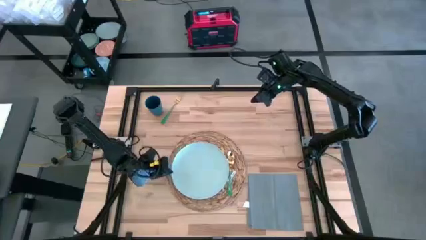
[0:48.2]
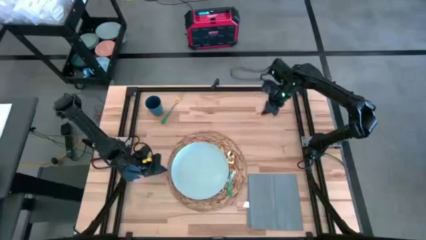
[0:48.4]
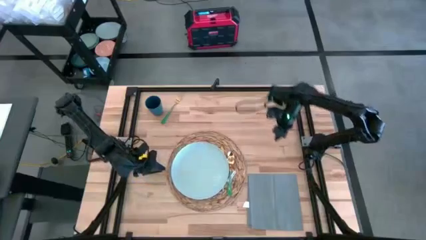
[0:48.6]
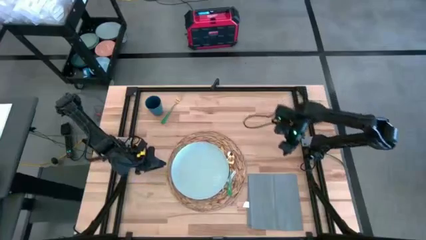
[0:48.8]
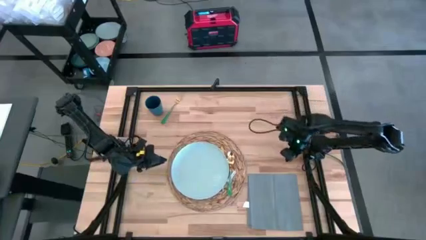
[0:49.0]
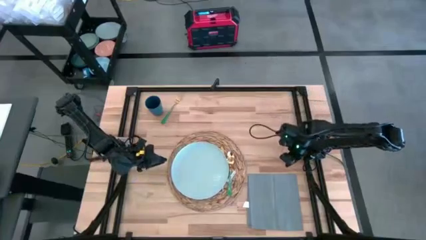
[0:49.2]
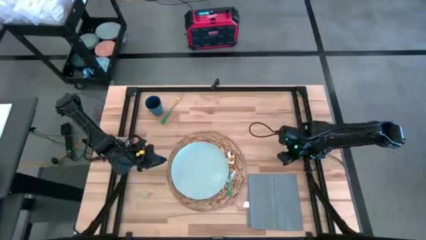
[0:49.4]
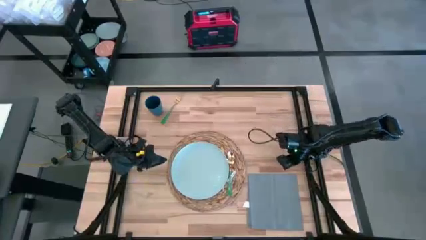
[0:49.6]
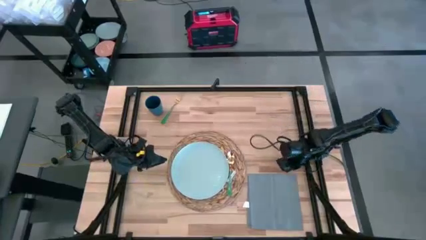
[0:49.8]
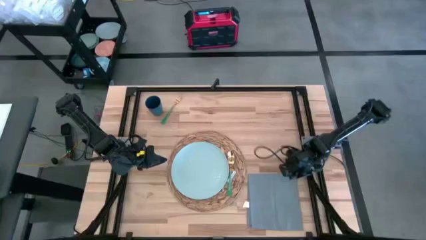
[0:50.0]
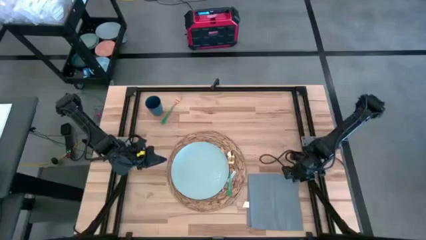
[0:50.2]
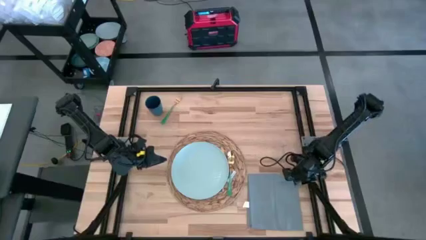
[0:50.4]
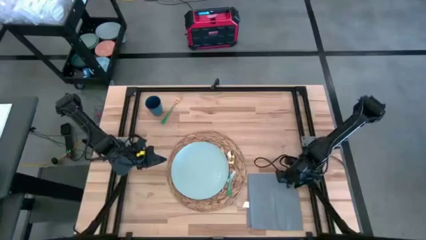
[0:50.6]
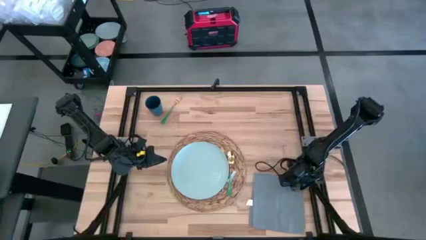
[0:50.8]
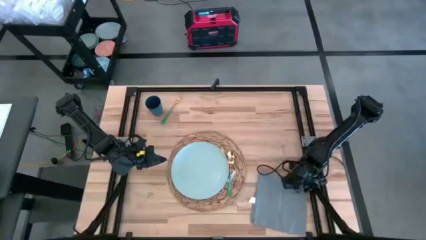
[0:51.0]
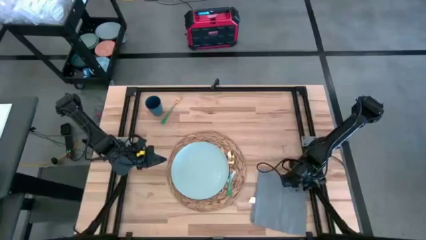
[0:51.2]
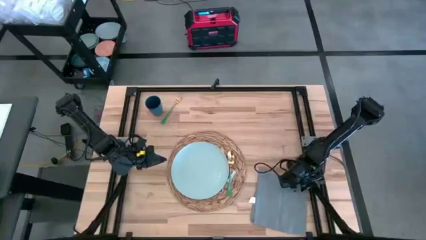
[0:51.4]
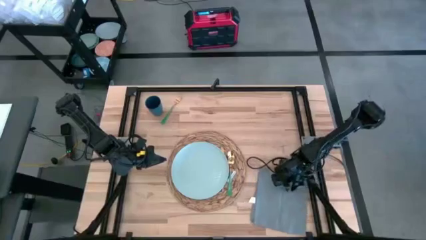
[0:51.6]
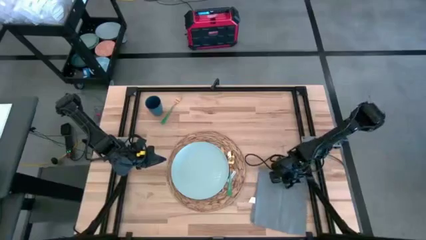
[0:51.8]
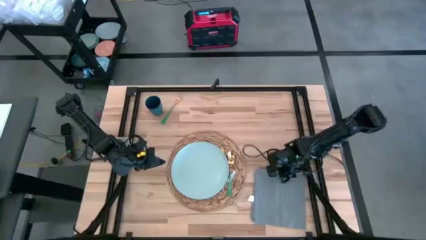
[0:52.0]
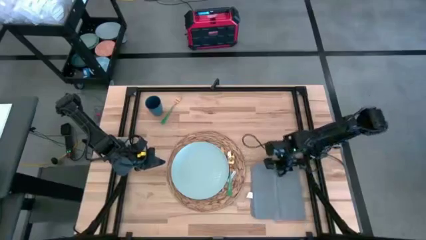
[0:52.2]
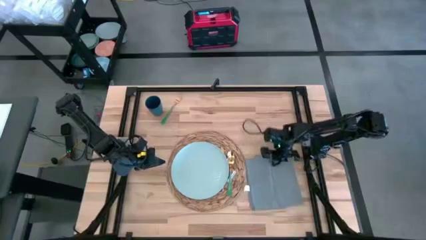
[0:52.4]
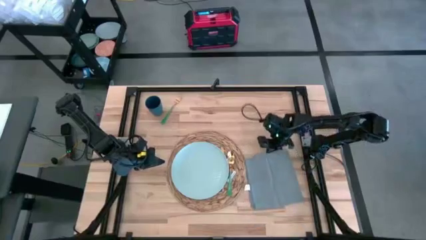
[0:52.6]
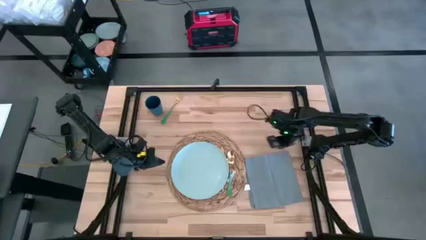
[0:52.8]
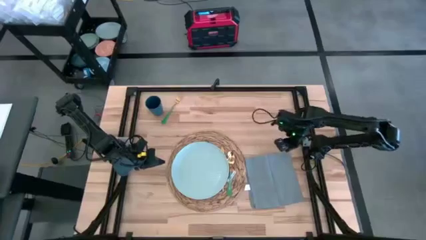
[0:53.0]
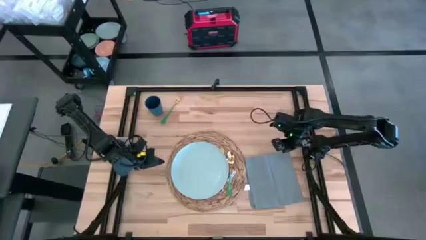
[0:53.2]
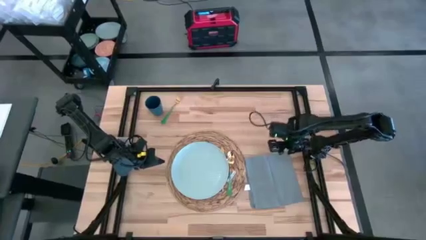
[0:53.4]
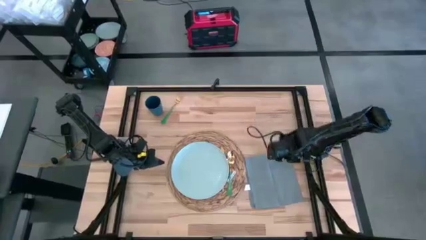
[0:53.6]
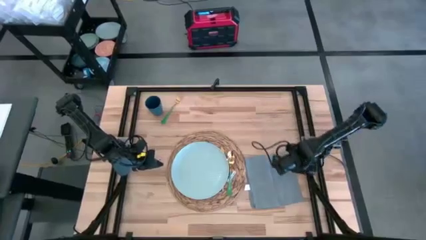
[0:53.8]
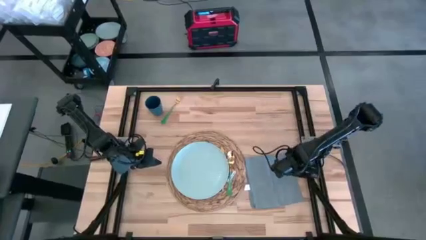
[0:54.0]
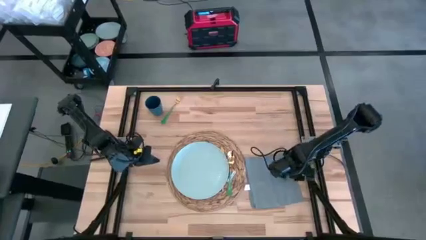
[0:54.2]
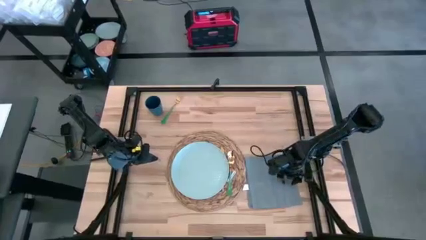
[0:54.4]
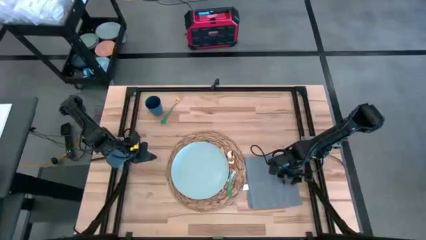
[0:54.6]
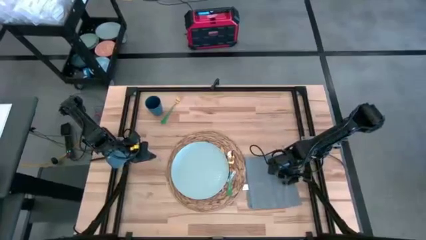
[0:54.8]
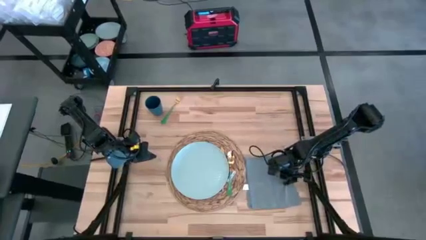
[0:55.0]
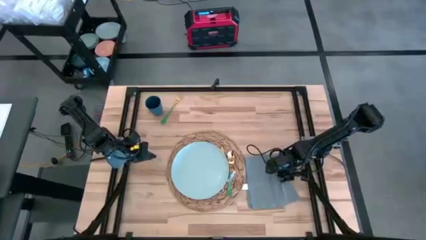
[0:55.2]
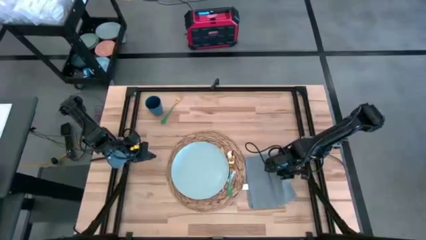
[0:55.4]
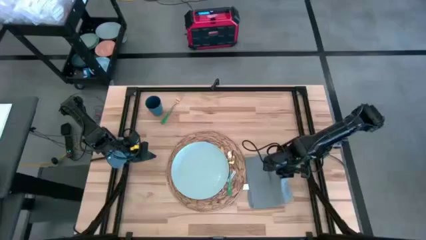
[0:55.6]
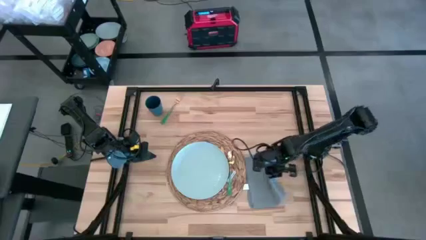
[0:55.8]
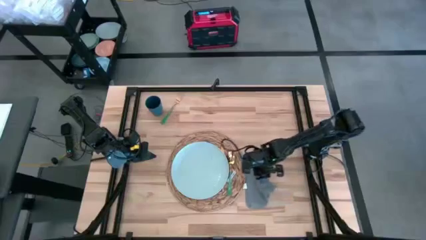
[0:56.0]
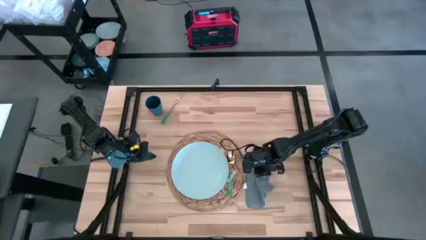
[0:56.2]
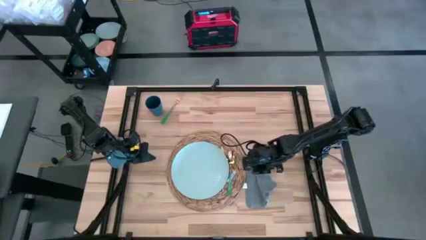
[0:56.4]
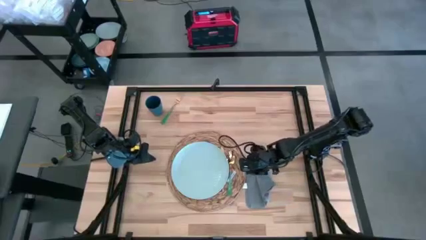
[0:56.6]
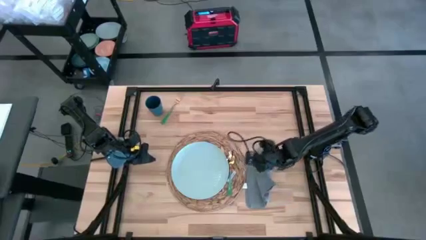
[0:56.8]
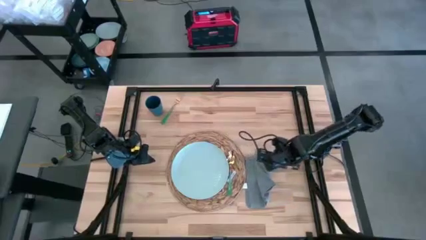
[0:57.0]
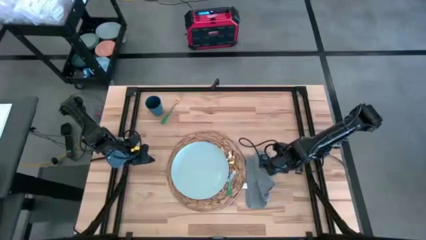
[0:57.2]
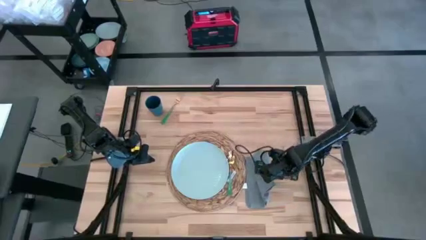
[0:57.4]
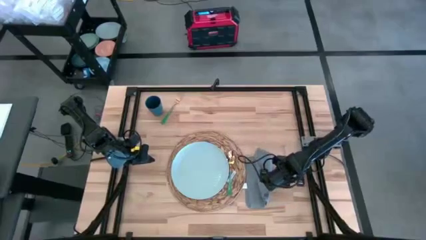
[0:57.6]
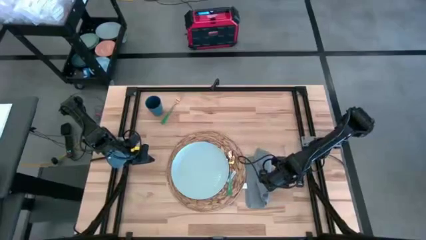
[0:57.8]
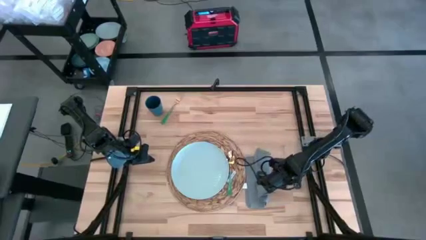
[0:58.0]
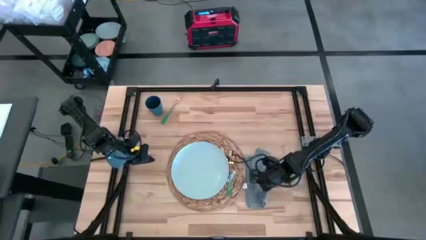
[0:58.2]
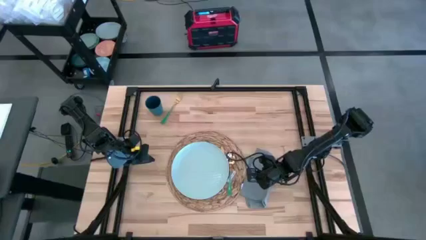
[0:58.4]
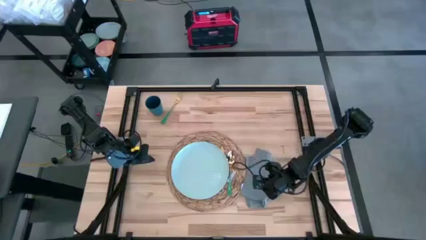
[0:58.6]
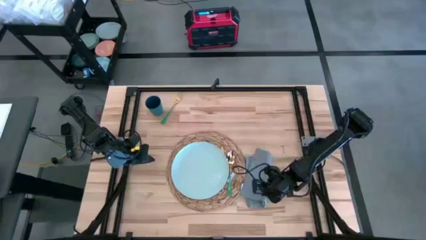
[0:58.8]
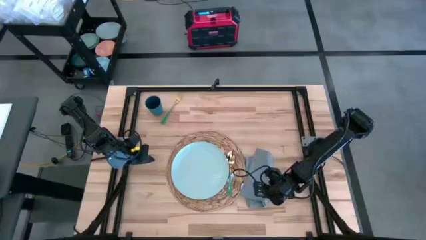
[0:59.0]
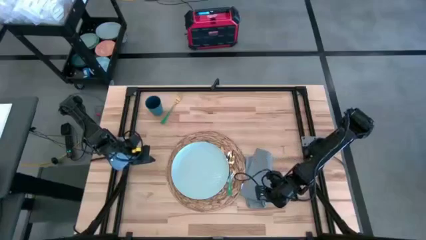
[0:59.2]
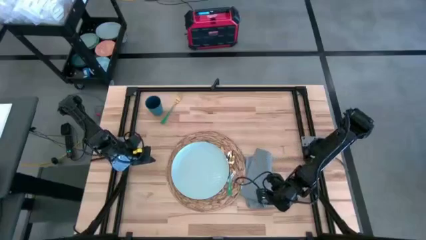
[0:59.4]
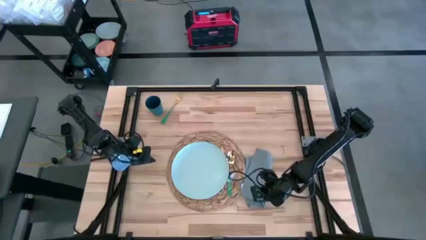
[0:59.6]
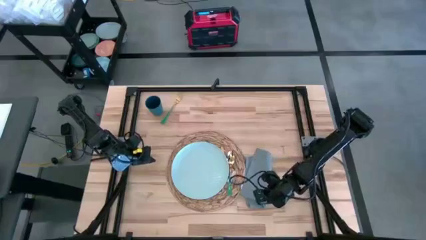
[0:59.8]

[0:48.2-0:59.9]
Task: Set table place
Fold the gray table napkin
